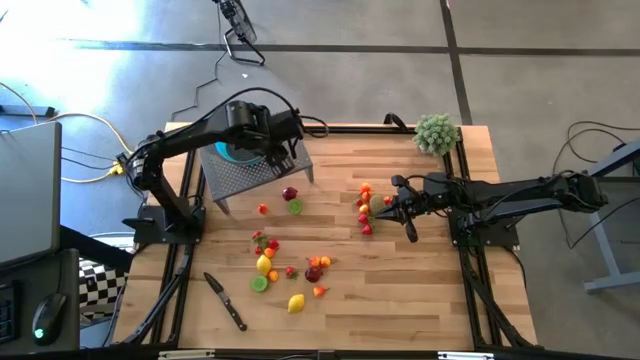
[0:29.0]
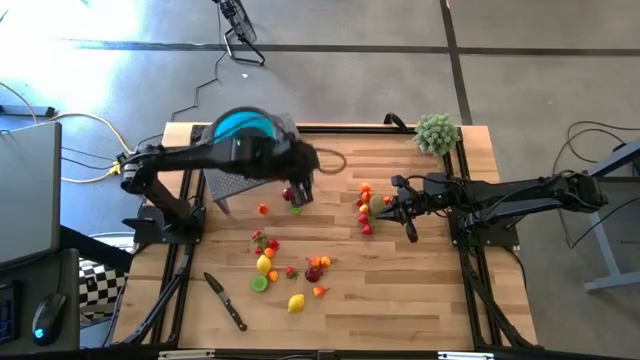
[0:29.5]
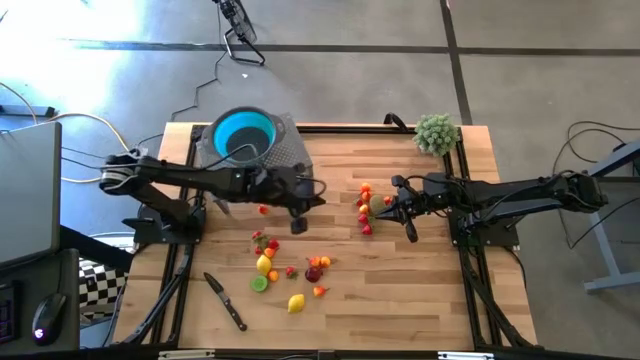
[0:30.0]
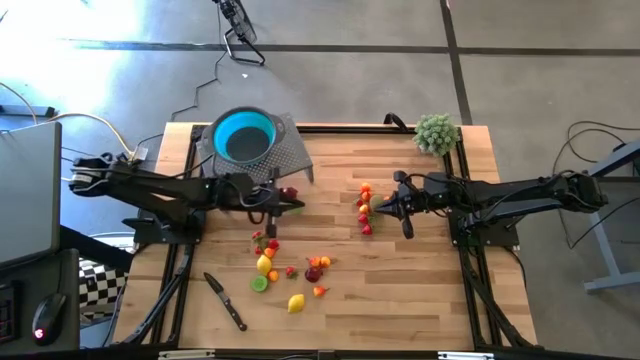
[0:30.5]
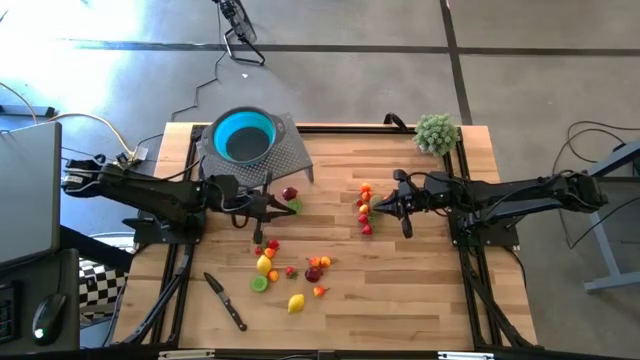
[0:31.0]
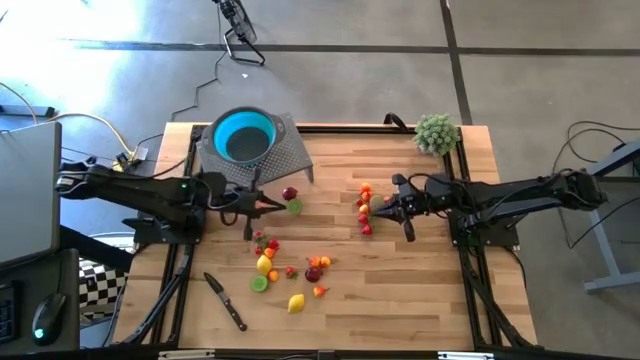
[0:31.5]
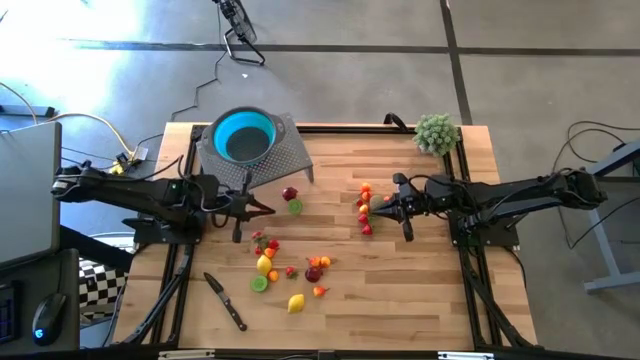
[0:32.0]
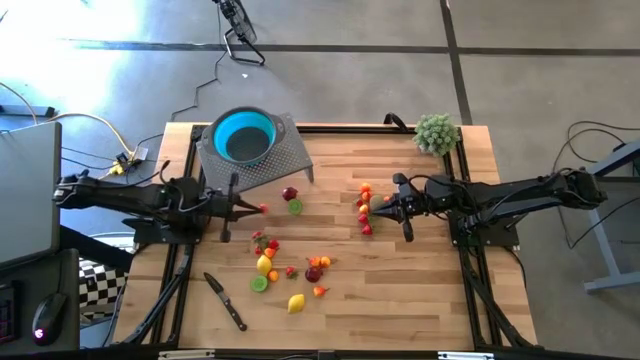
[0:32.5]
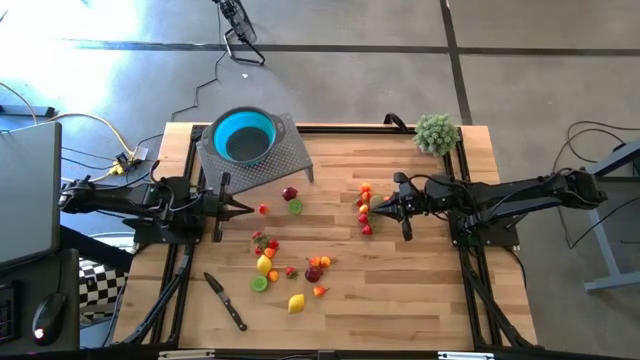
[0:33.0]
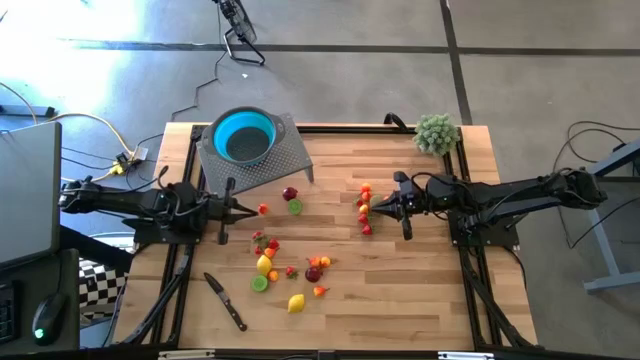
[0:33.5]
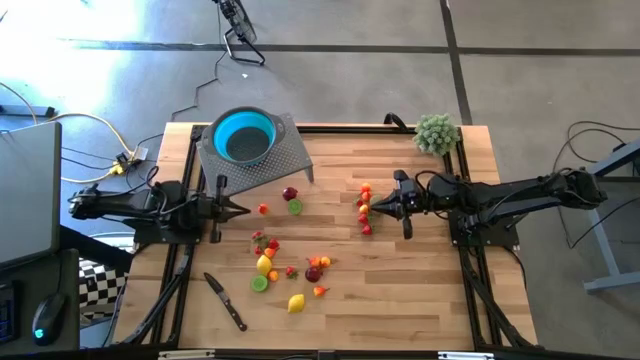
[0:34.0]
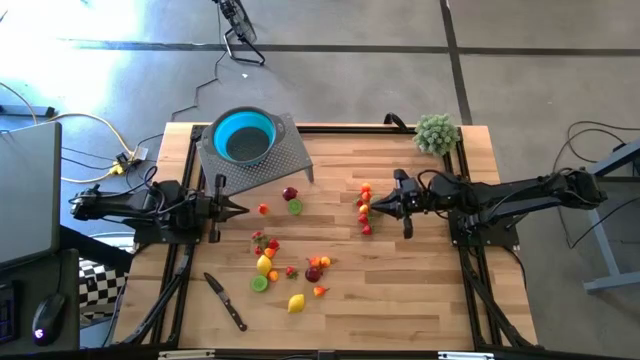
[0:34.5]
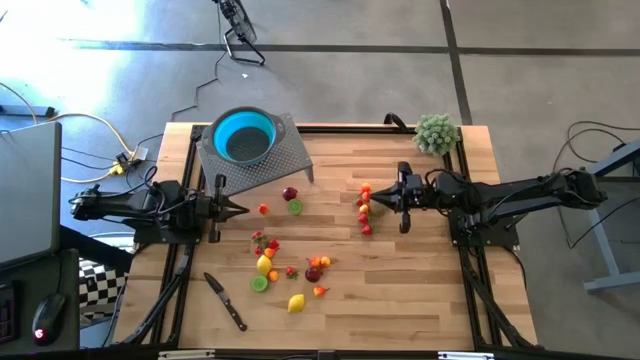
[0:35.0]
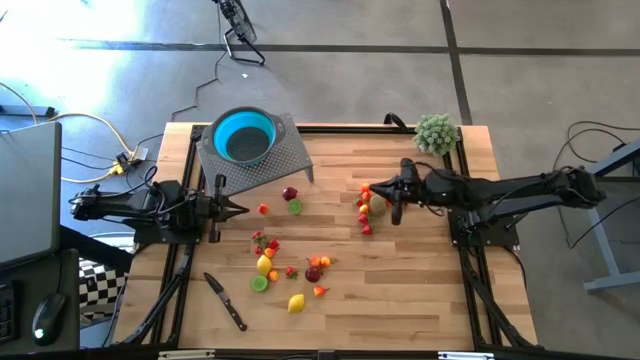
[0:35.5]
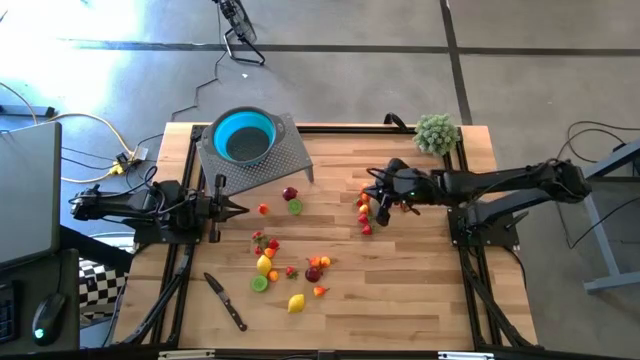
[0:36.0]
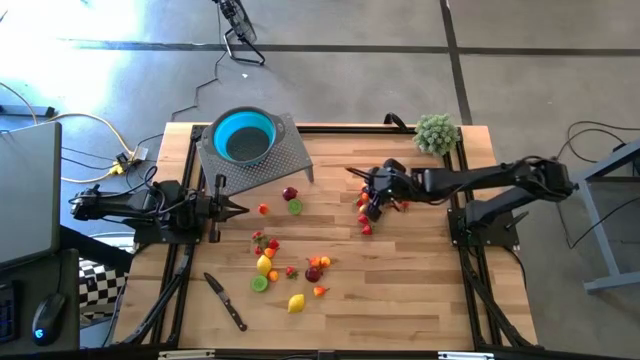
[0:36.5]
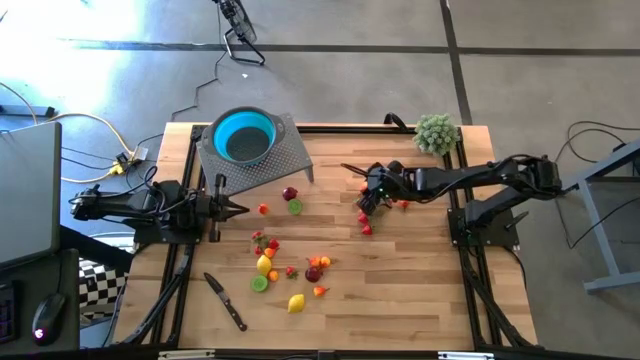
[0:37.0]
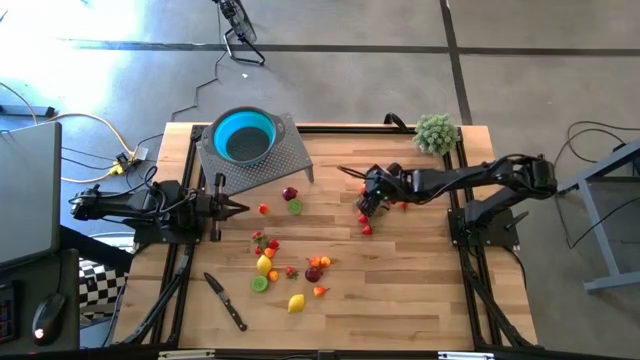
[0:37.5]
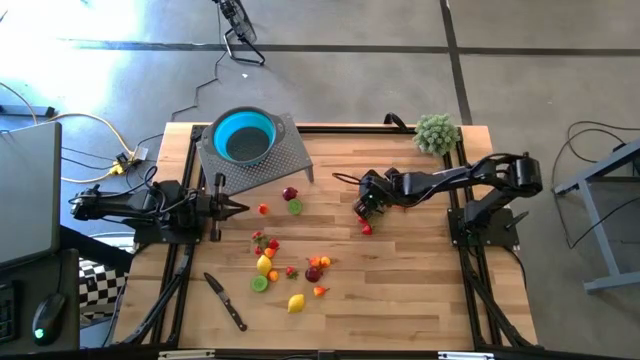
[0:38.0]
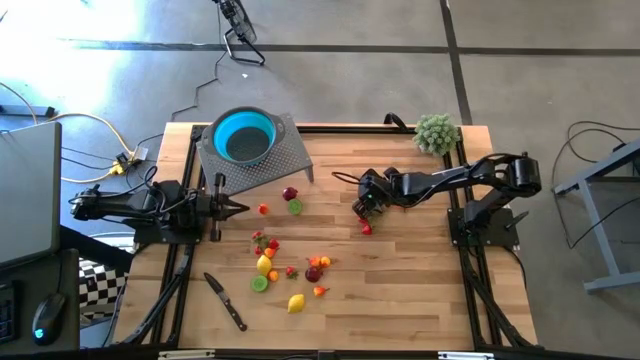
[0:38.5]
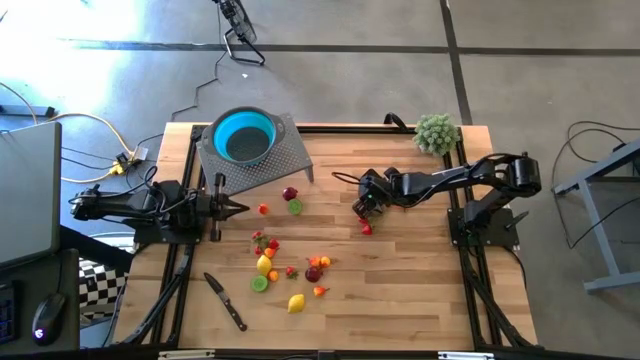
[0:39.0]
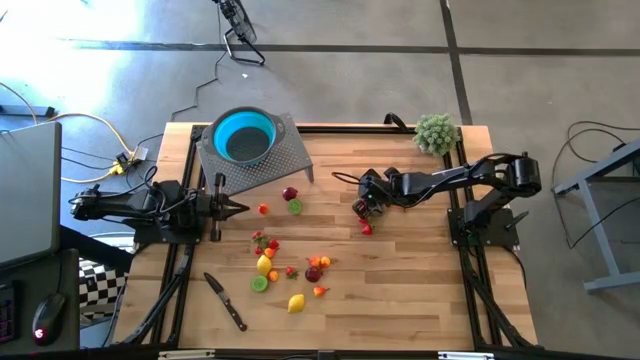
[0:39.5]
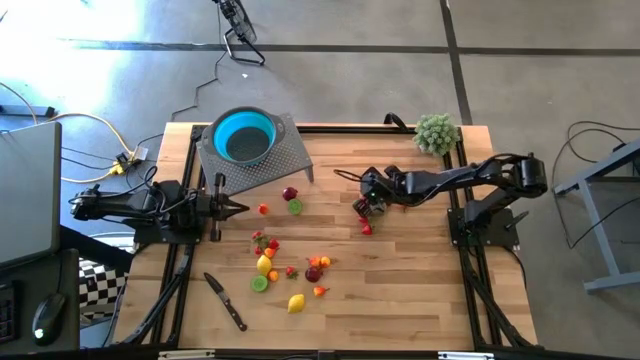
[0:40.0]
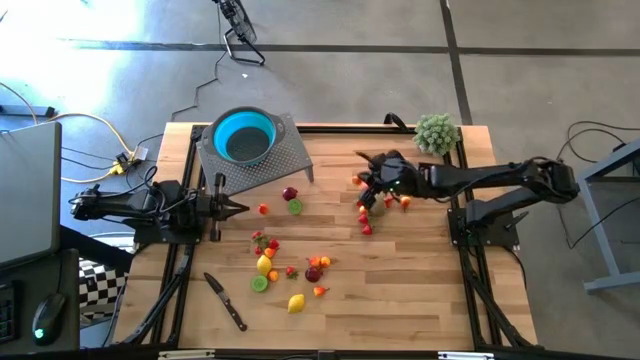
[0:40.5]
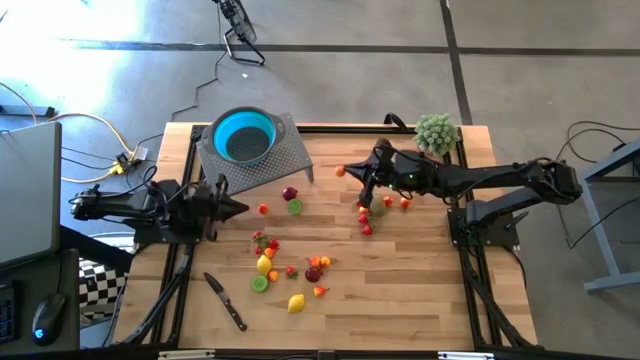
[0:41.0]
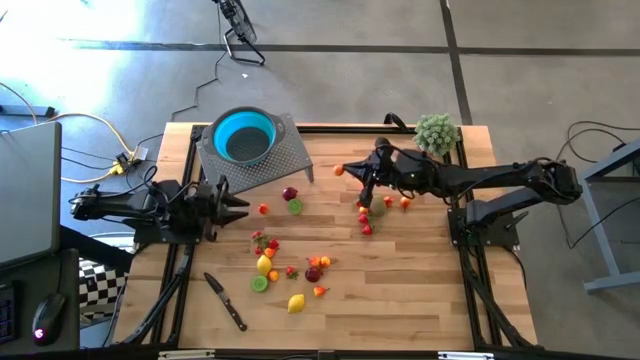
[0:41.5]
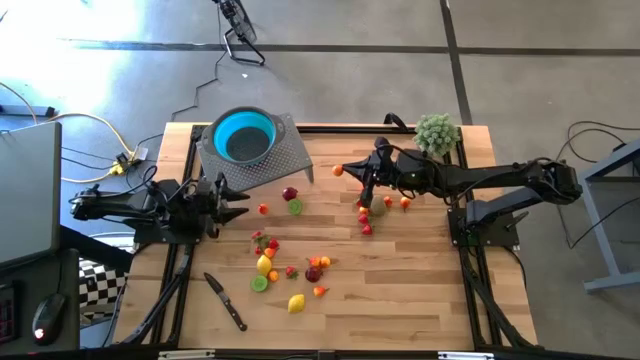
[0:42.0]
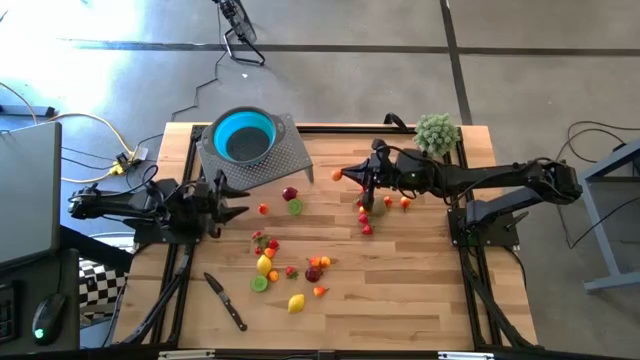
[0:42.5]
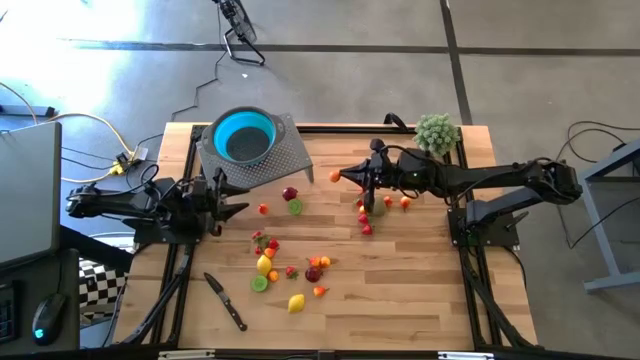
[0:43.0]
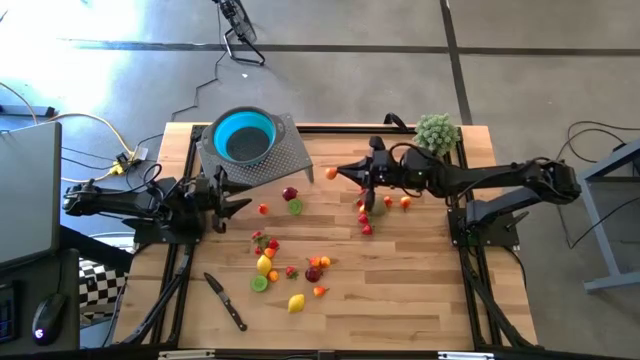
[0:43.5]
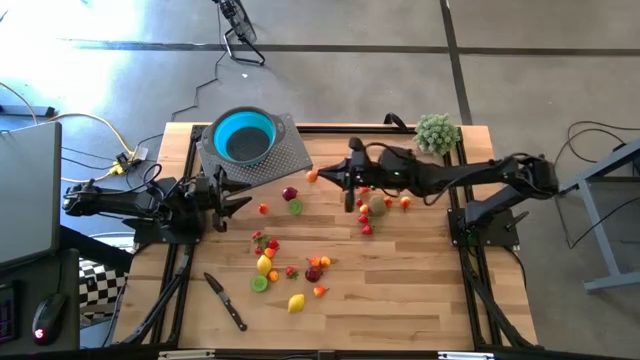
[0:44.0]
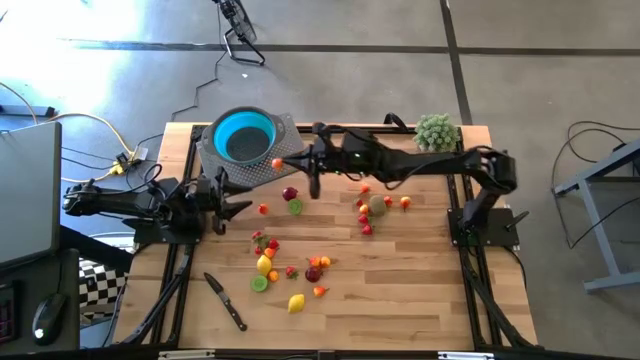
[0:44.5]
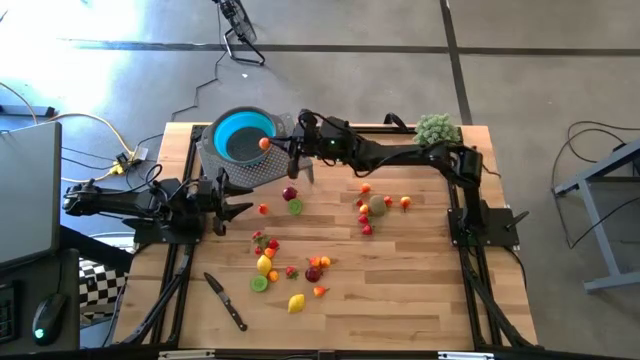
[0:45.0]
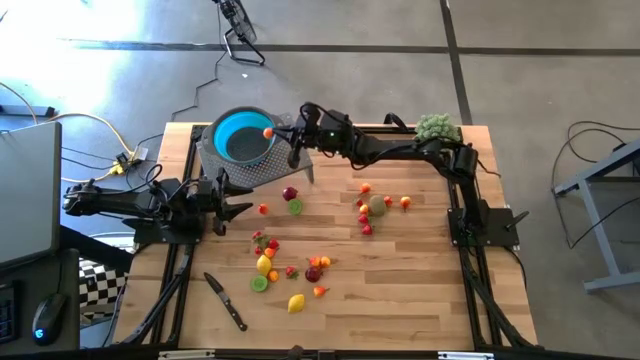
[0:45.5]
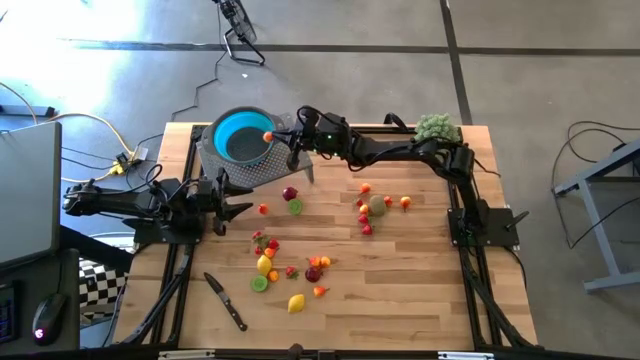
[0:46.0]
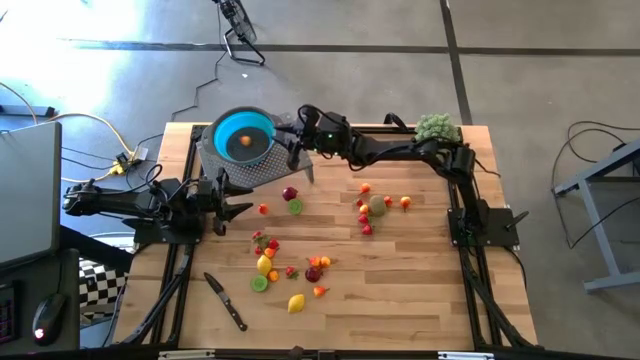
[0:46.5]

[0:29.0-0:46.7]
Task: Pick & Place Fruit
Put the orange pear into the blue strainer bowl on the shelf
